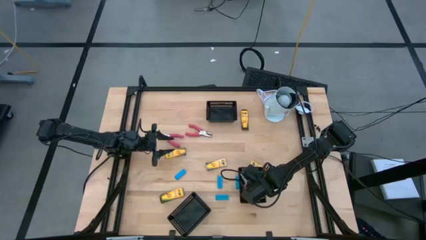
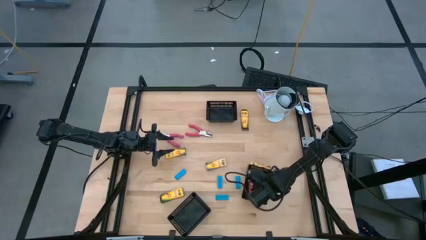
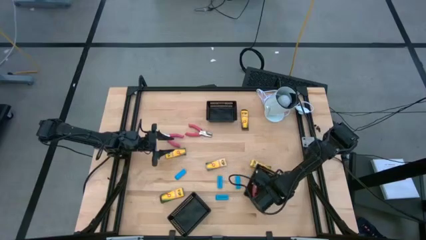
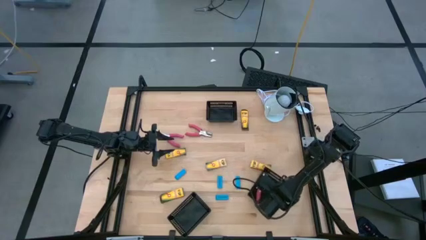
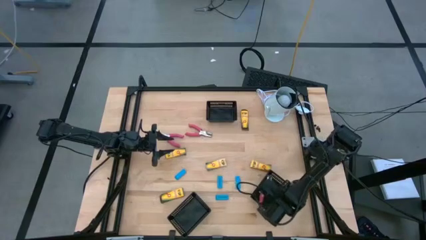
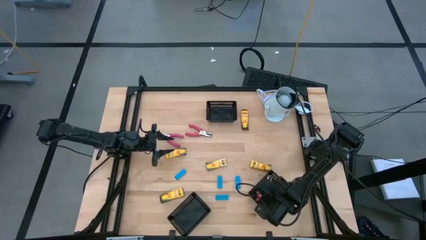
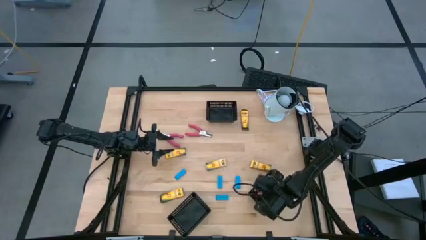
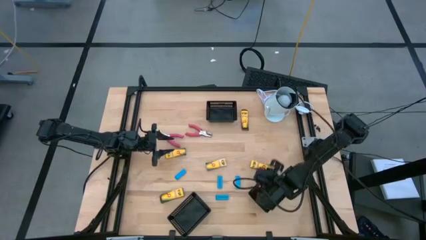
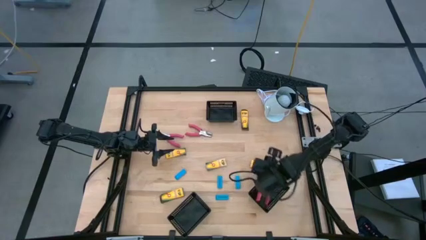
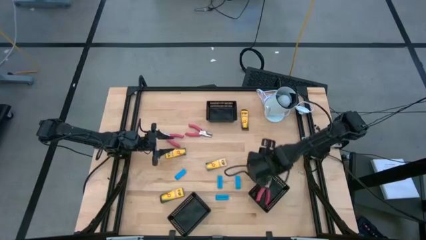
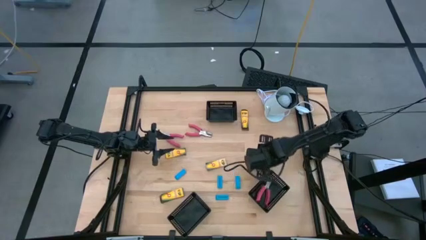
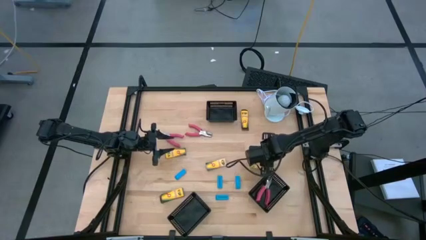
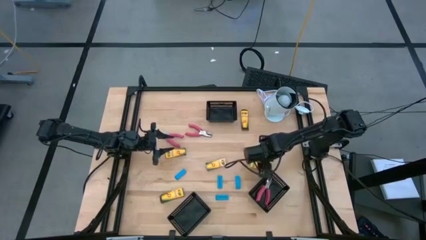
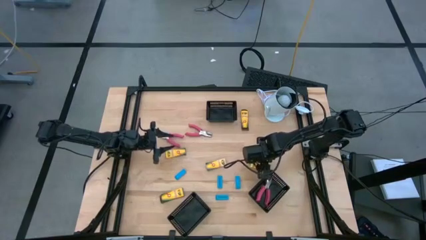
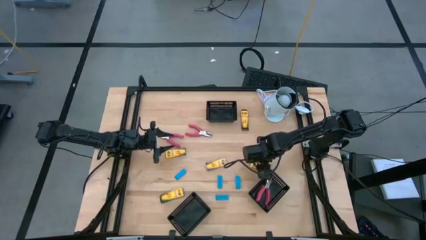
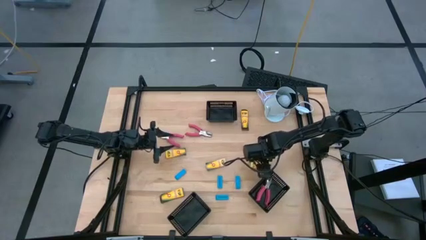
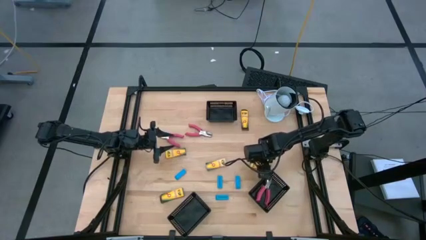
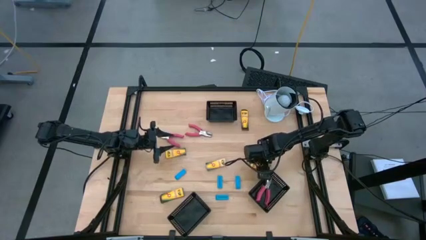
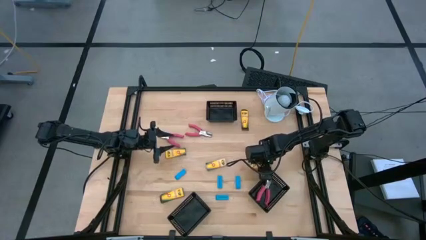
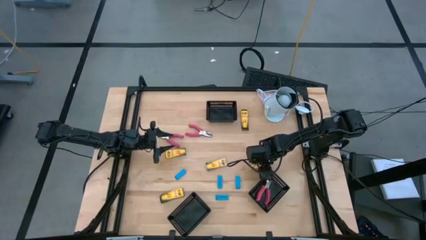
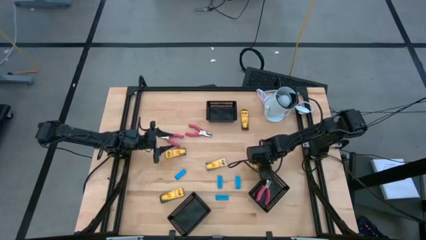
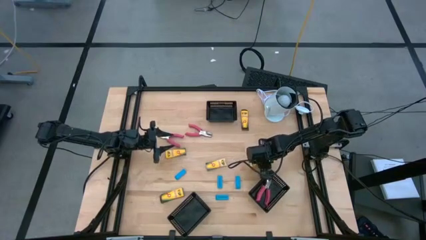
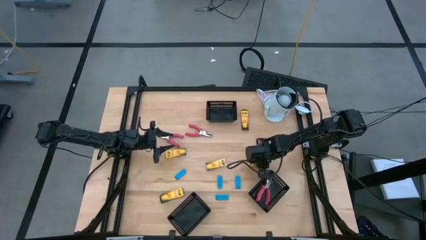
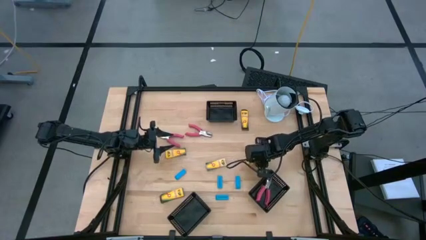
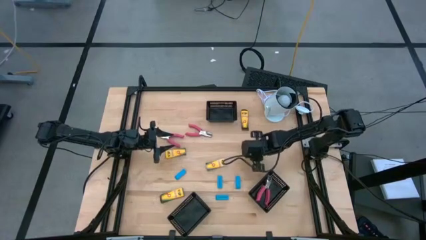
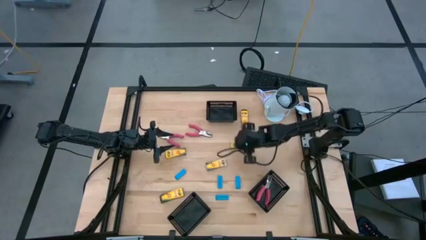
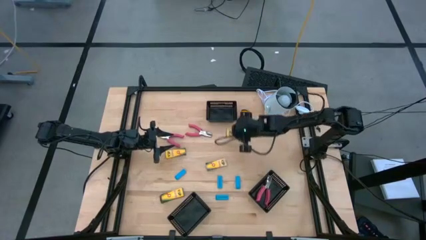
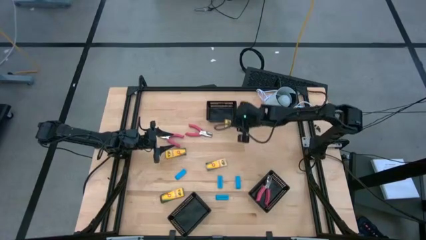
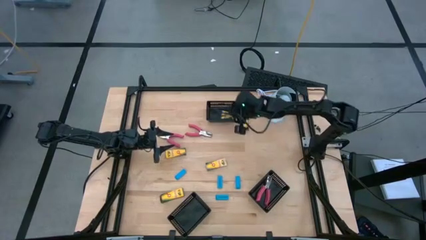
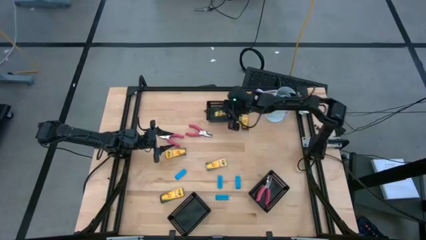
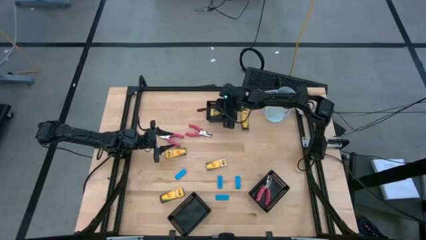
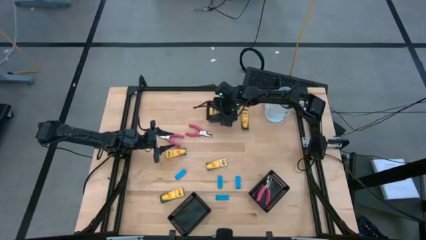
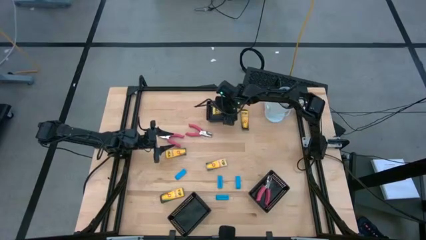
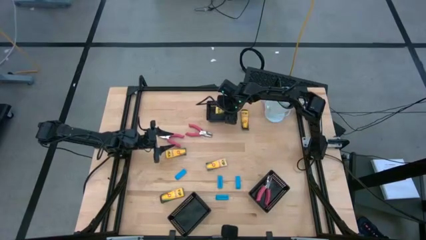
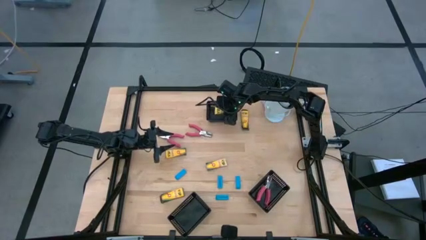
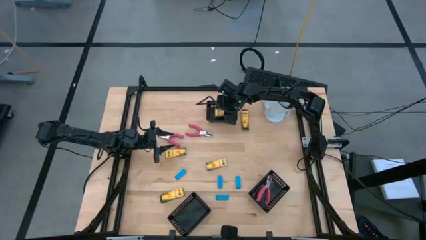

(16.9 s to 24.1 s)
Task: Pick & Place School Supplies
Put the yellow crayon box into the top black bin

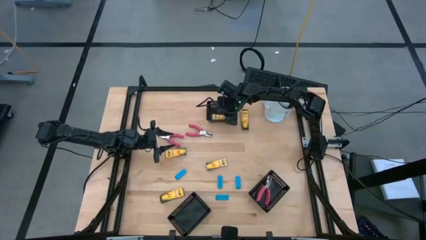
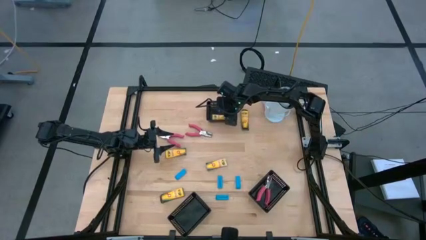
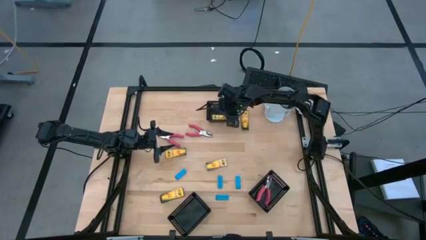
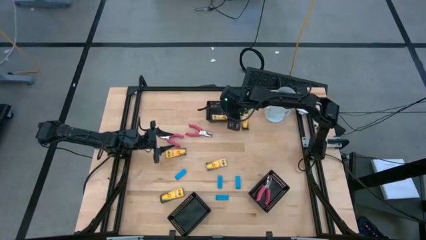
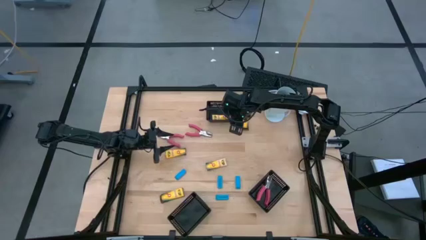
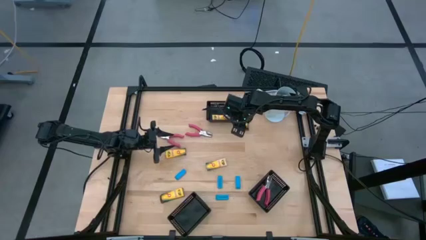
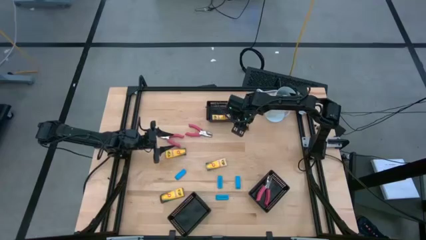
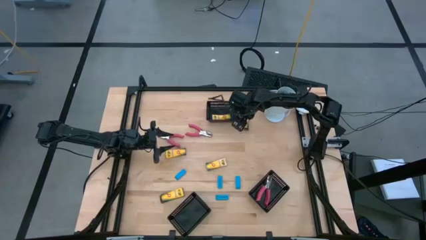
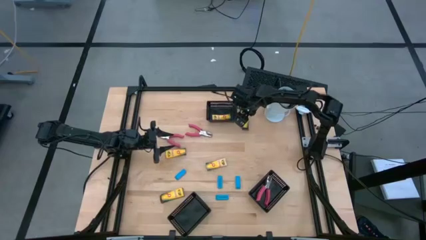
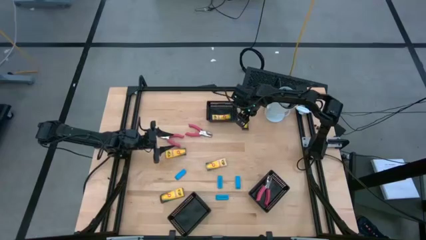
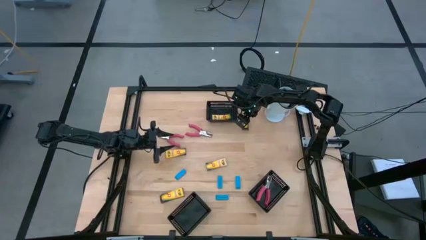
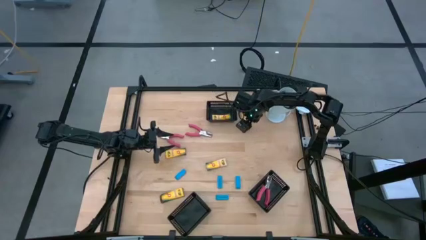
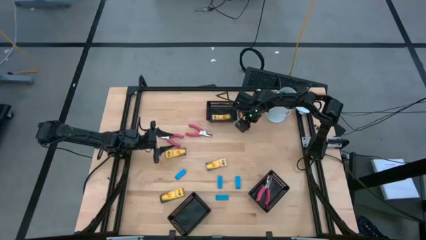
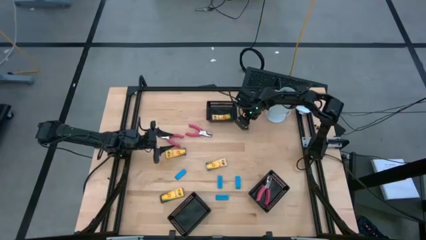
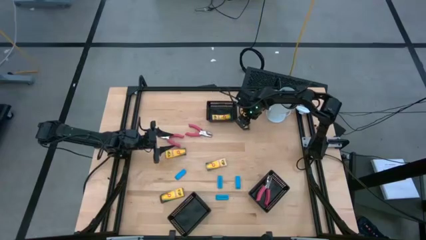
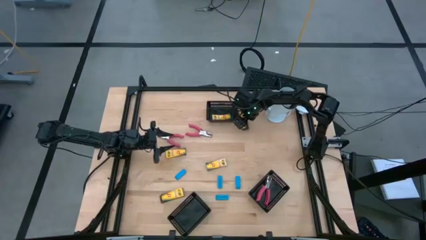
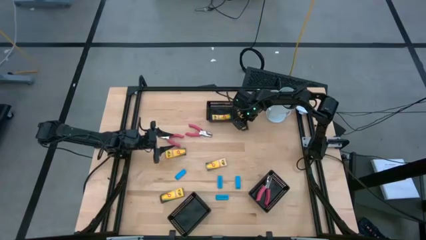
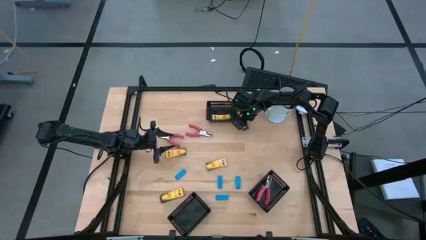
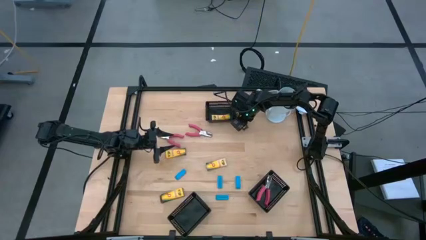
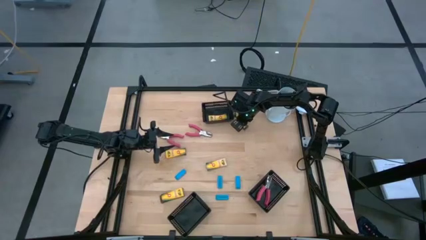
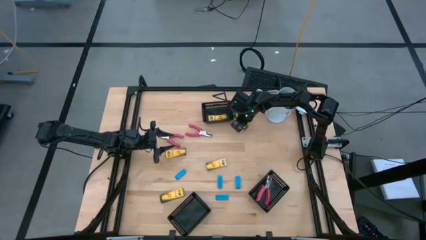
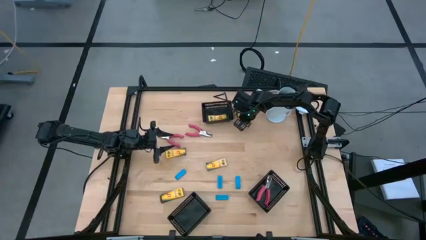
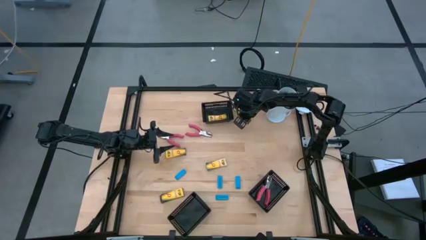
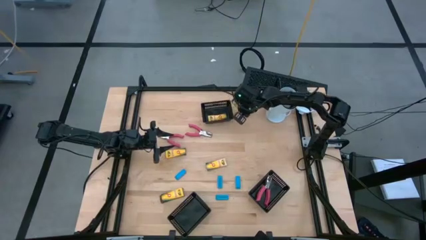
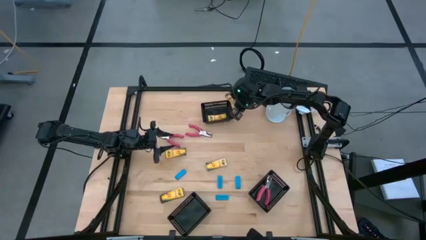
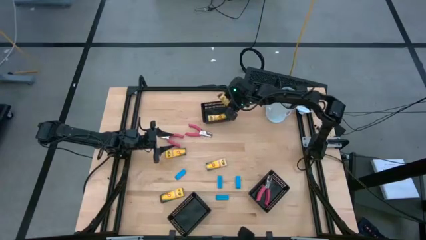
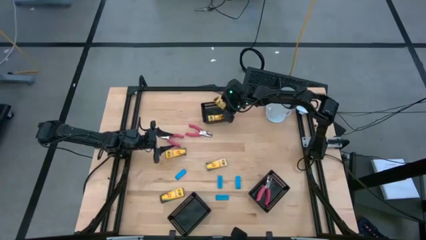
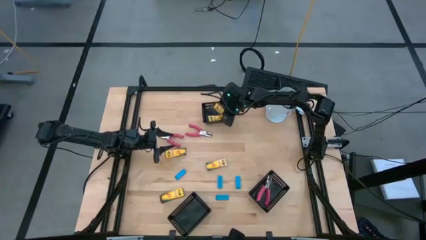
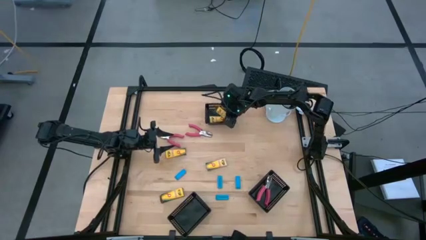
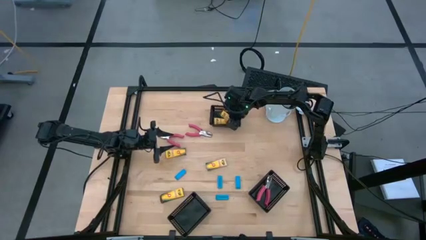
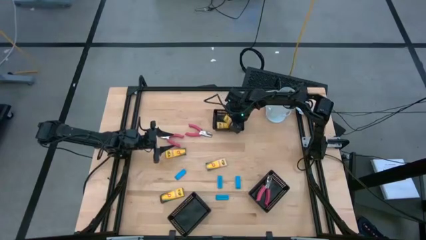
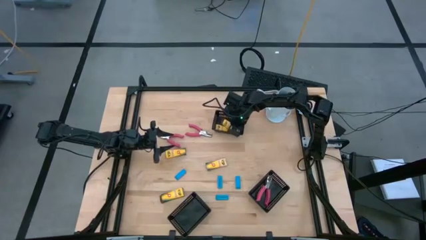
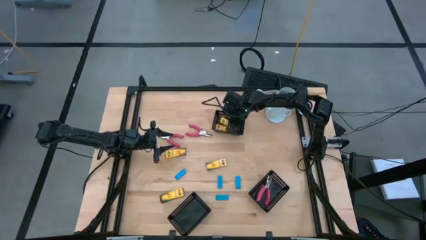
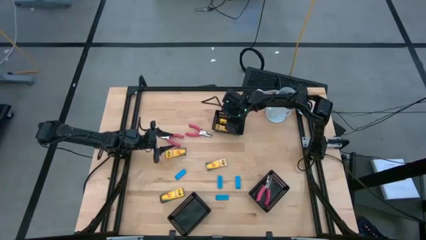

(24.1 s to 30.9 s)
Put the yellow crayon box into the top black bin

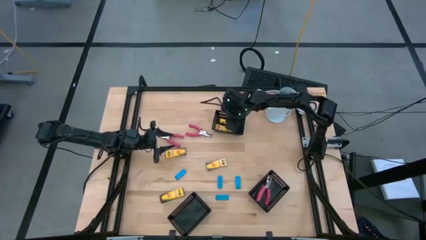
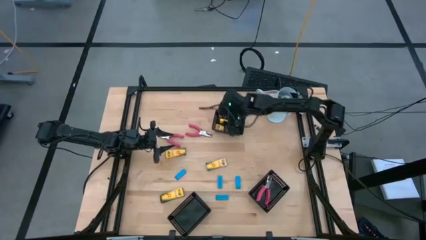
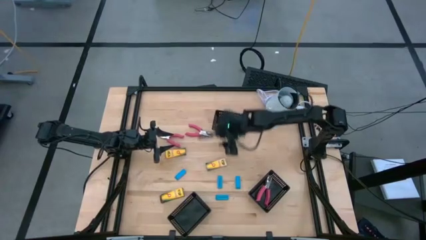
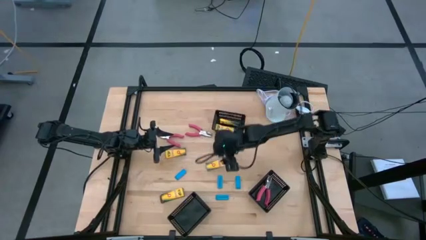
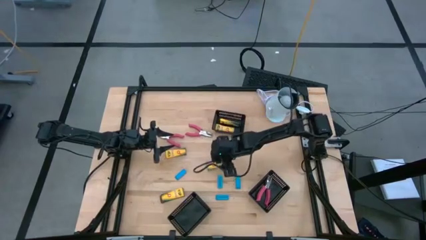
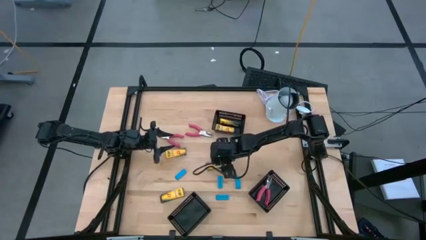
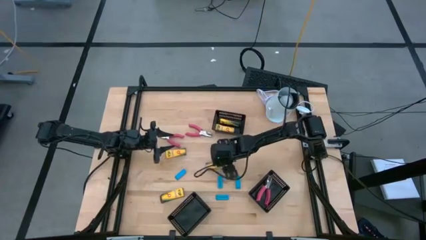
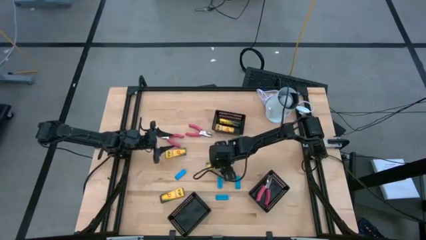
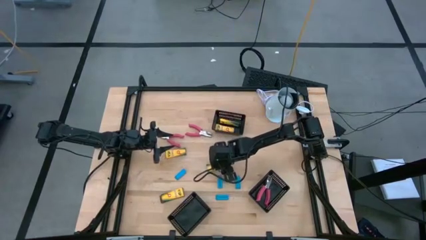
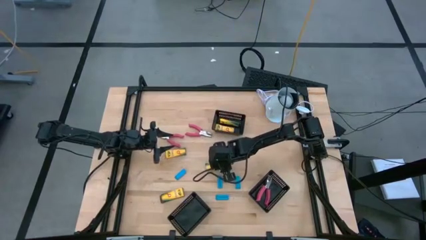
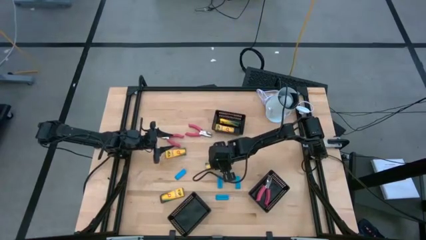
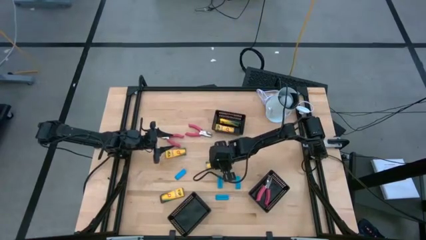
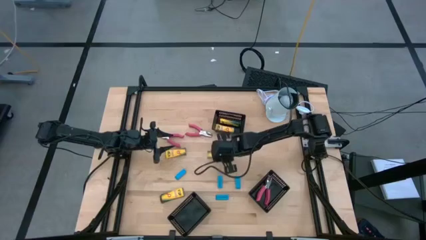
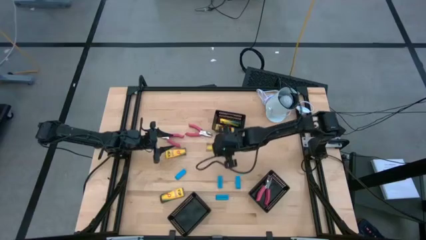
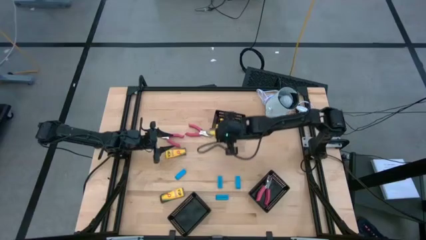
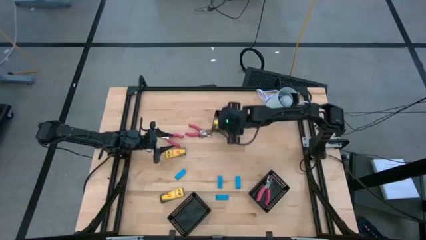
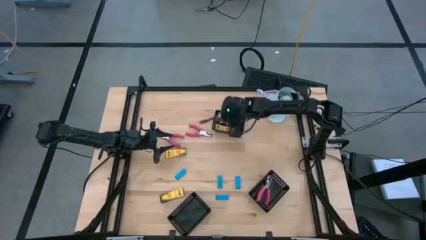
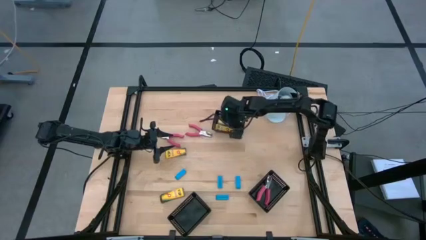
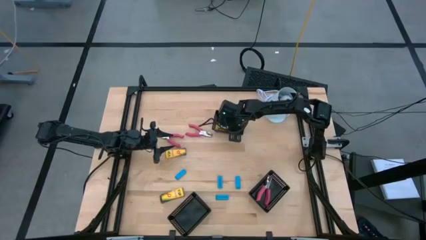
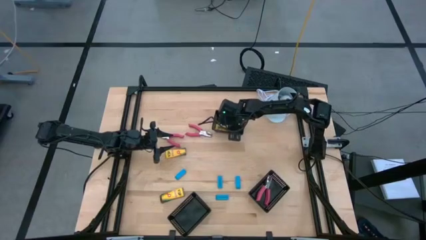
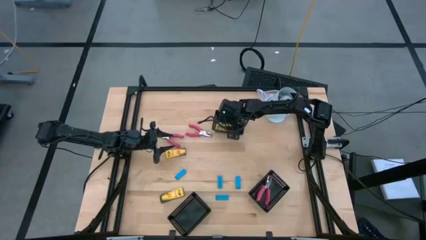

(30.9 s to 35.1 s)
Put the yellow crayon box into the top black bin
